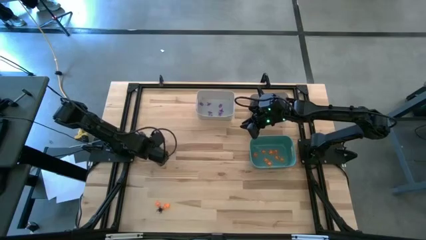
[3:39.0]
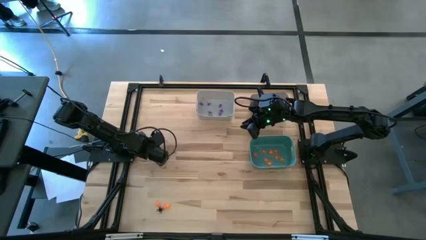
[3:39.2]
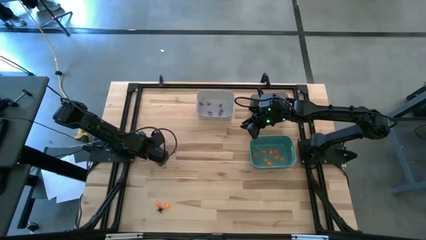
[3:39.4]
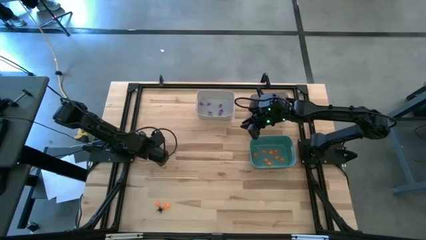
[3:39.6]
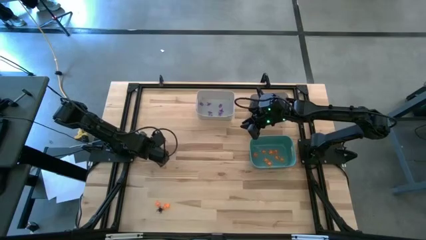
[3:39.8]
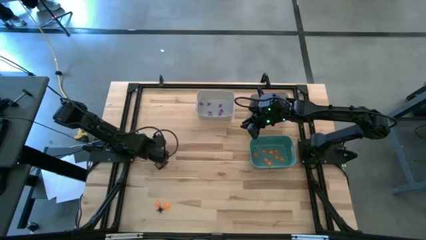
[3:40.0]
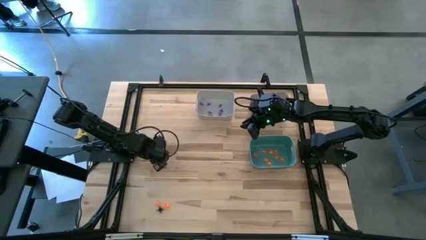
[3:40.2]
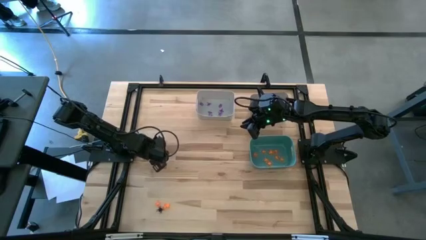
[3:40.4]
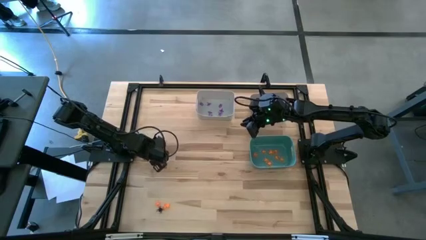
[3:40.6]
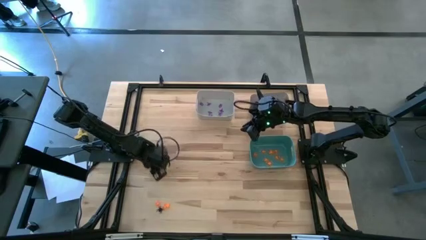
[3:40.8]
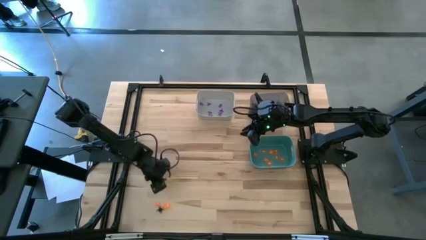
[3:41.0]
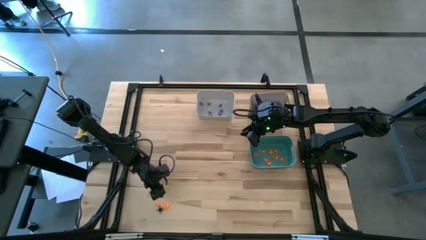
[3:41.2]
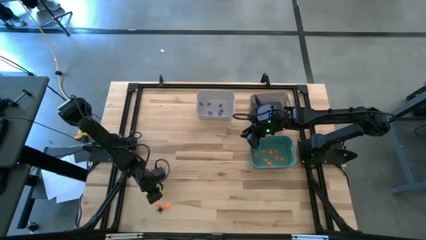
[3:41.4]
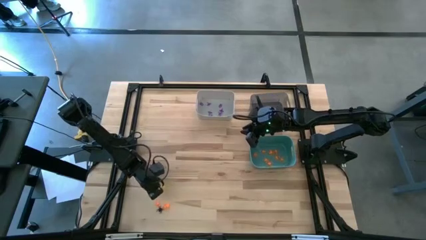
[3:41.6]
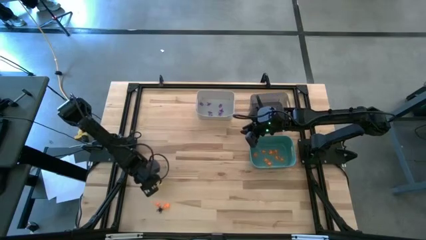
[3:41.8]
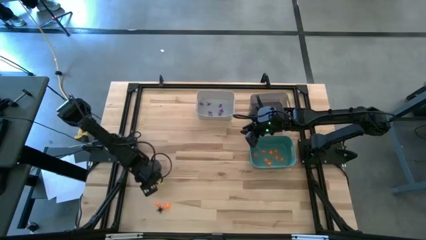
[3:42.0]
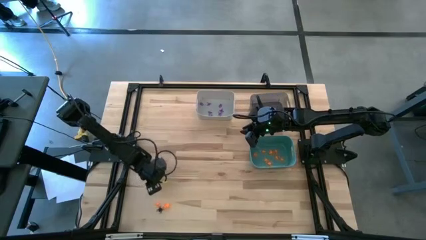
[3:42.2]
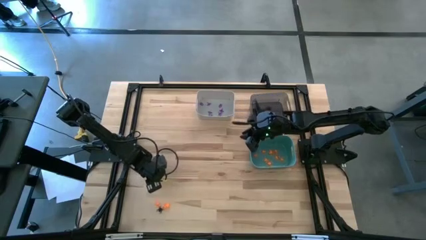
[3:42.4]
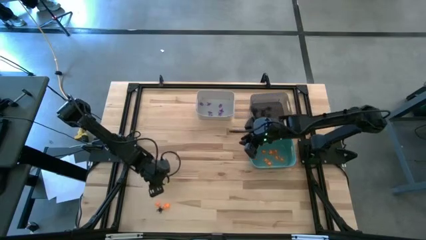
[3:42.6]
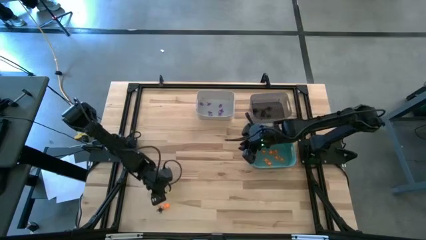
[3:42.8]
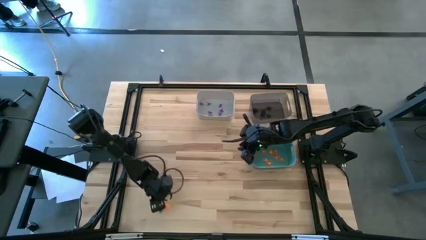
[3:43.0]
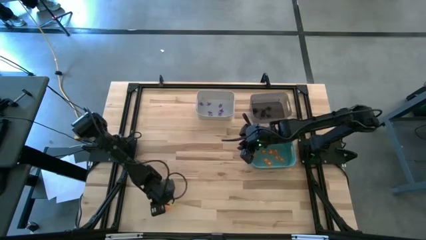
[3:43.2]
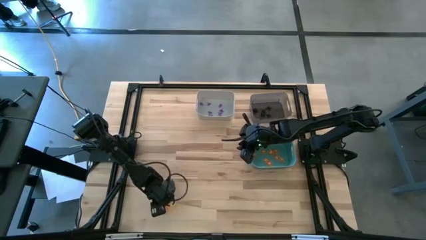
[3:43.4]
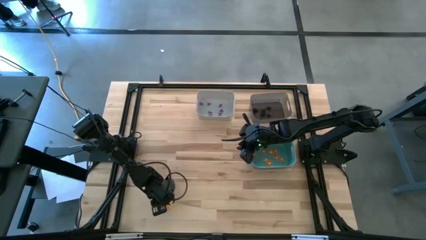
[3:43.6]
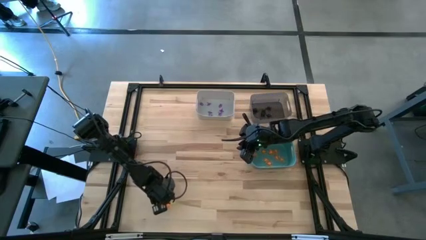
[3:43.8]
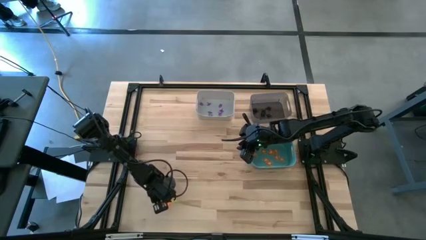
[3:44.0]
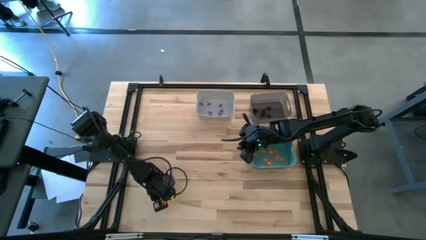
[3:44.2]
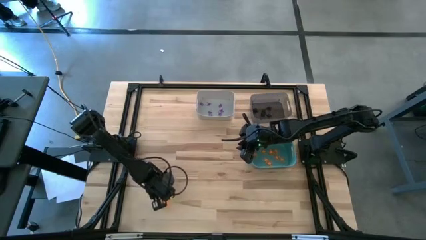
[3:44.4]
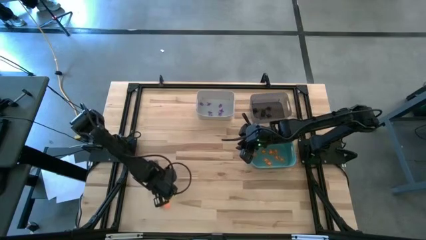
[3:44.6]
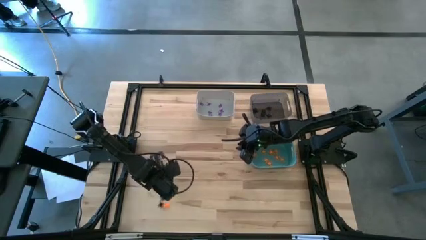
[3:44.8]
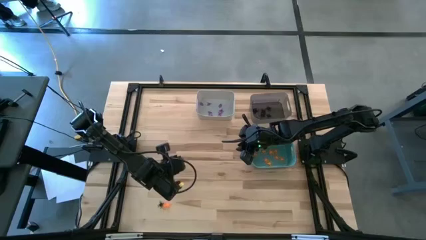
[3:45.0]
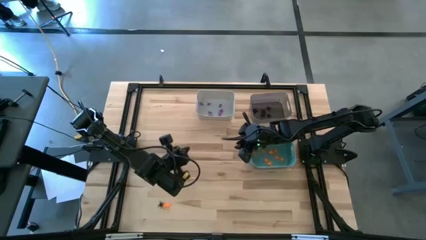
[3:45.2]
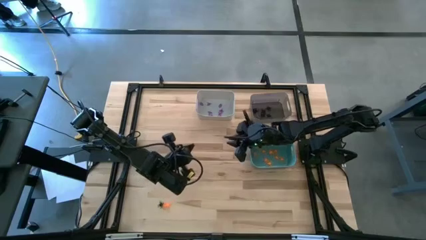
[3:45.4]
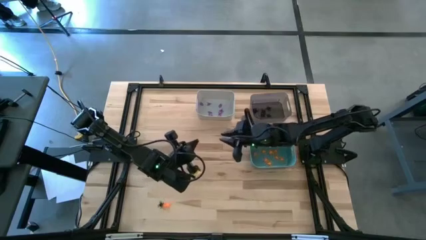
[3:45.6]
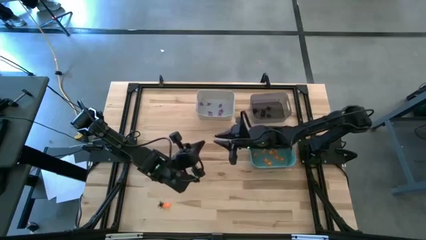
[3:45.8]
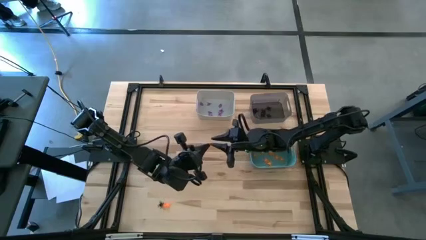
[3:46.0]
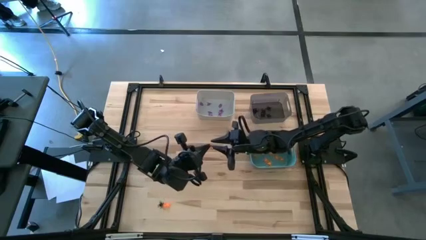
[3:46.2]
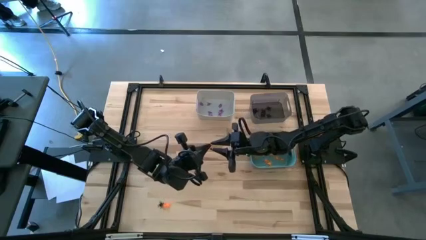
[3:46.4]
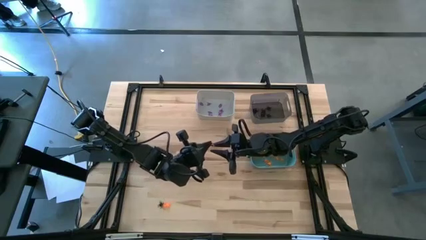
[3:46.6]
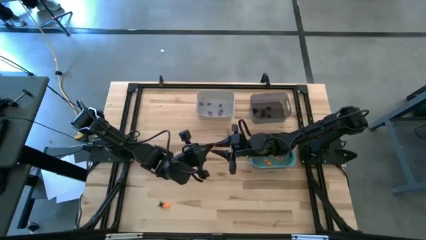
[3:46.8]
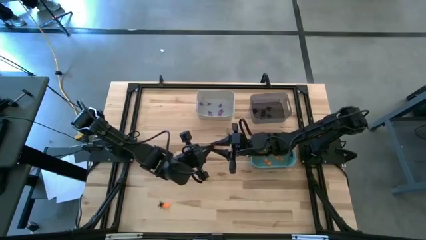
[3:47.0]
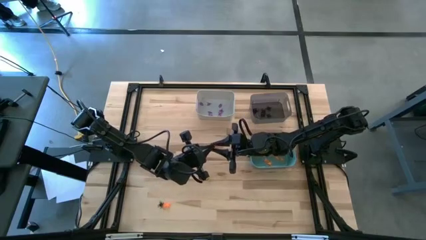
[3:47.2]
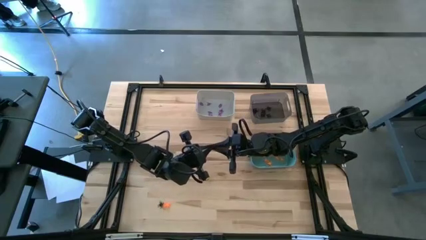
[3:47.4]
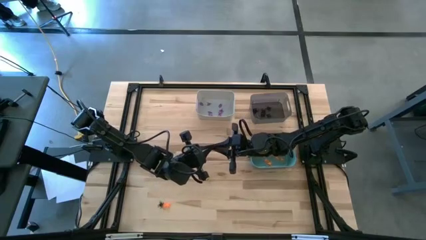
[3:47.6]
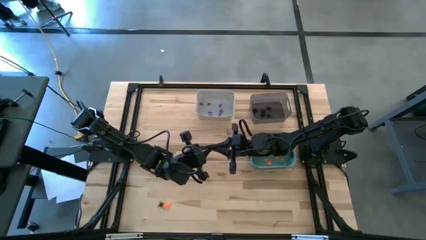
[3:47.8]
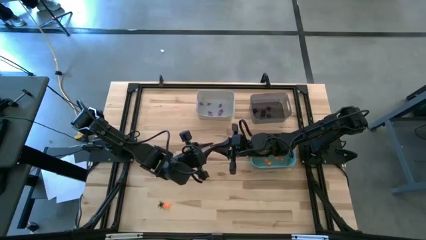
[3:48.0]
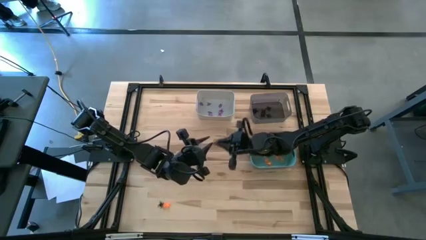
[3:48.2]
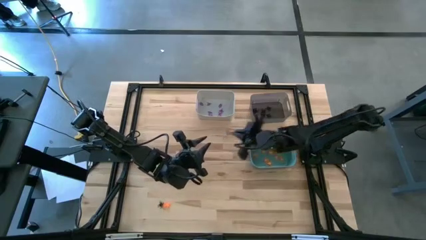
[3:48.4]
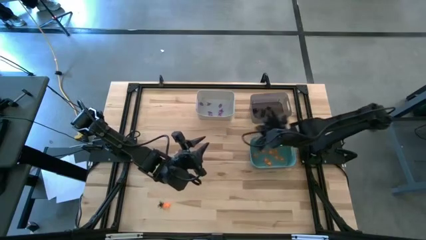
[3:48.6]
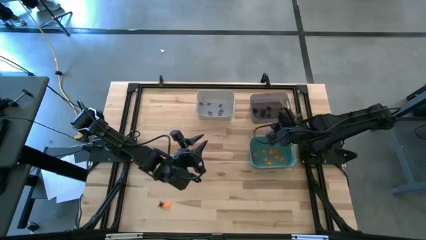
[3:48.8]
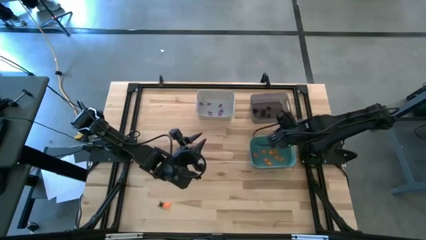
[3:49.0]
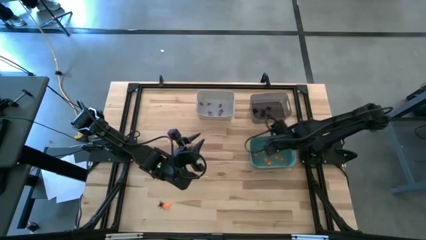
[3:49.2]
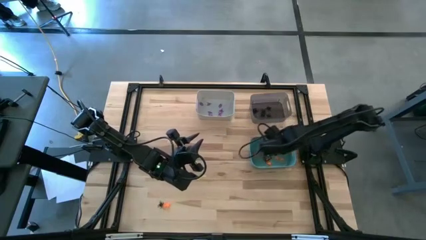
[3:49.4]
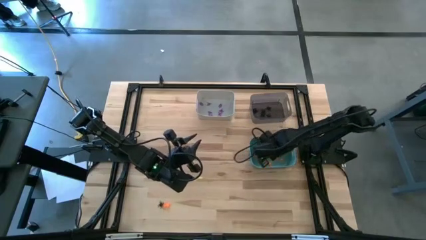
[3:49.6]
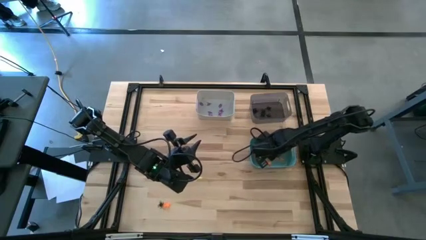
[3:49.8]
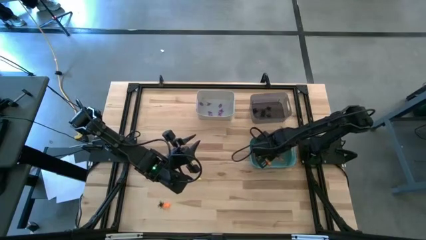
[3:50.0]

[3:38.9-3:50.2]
Task: Sort Halloween decoration
Put the orange spider toy into the green bin

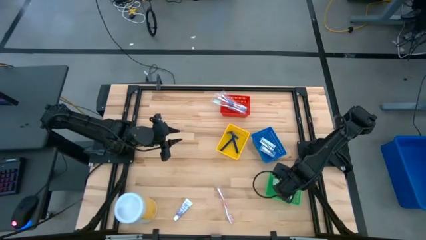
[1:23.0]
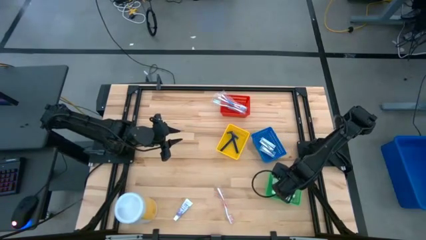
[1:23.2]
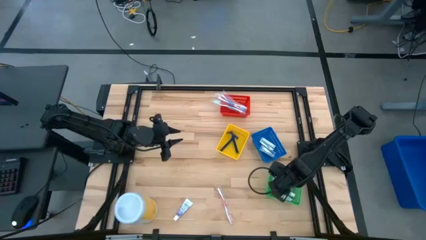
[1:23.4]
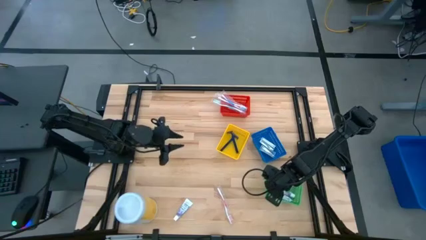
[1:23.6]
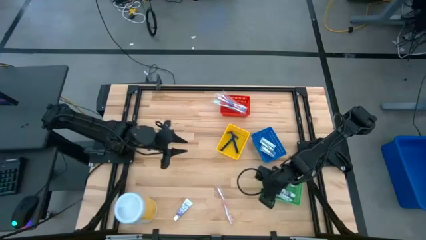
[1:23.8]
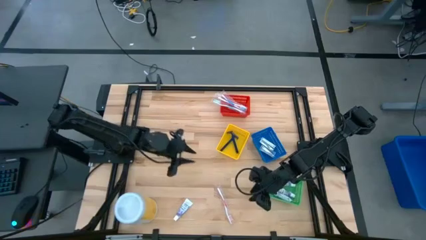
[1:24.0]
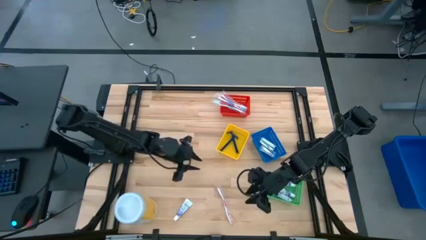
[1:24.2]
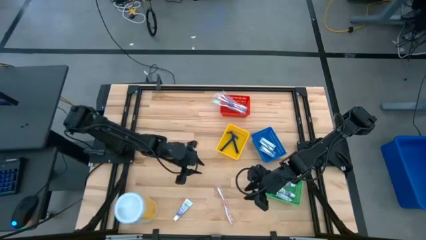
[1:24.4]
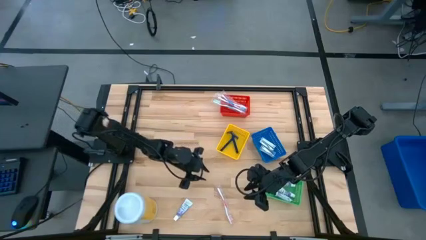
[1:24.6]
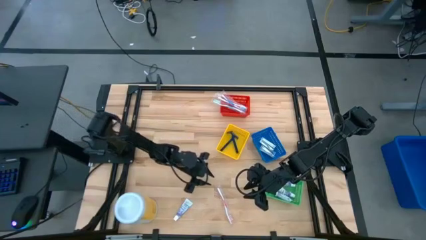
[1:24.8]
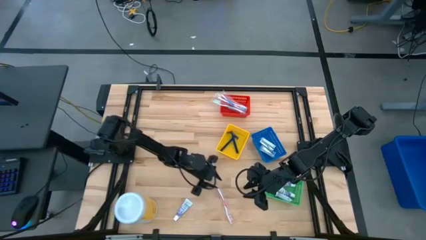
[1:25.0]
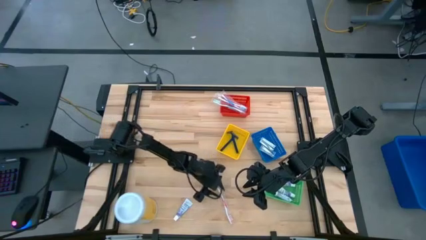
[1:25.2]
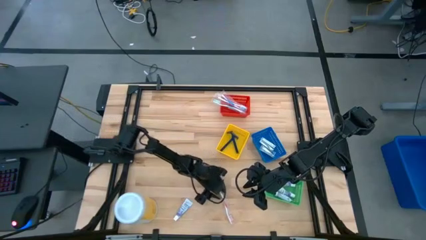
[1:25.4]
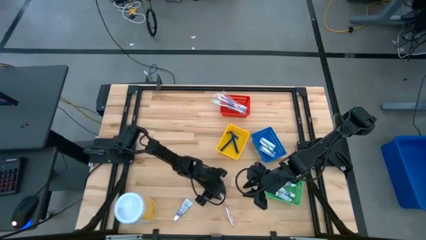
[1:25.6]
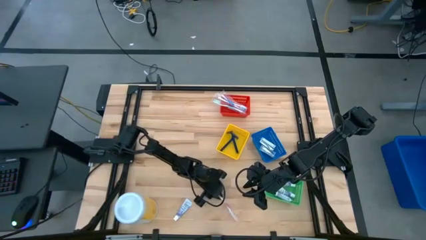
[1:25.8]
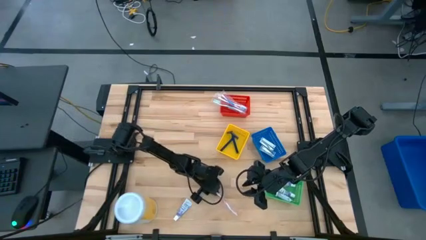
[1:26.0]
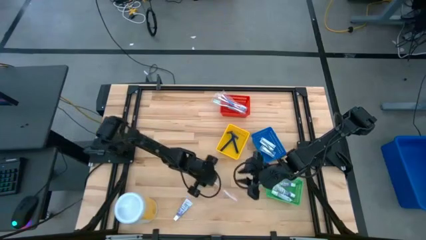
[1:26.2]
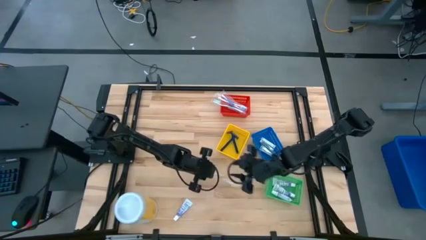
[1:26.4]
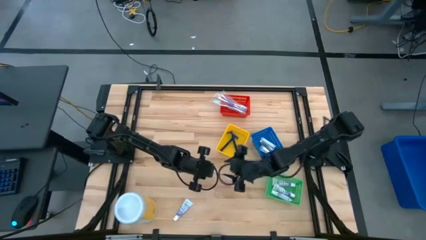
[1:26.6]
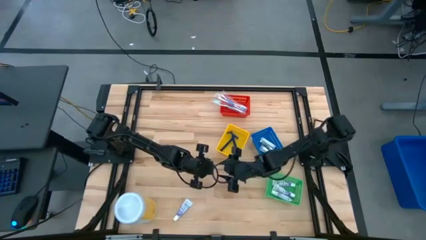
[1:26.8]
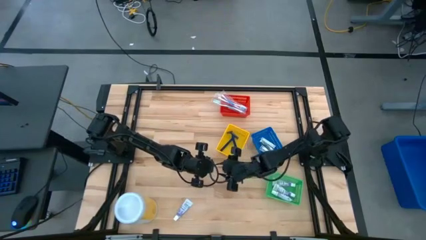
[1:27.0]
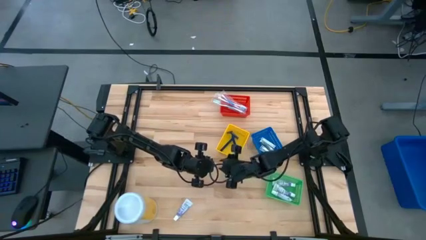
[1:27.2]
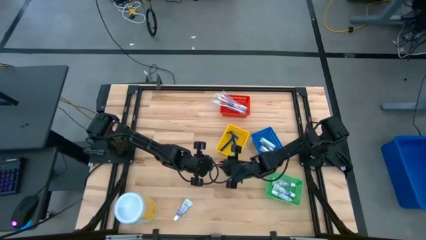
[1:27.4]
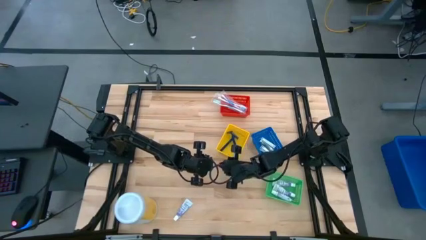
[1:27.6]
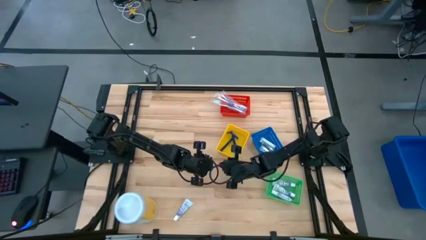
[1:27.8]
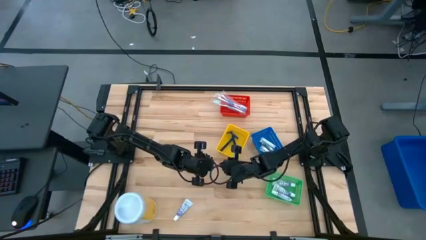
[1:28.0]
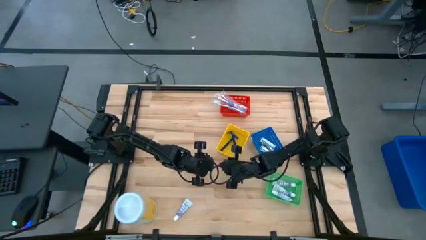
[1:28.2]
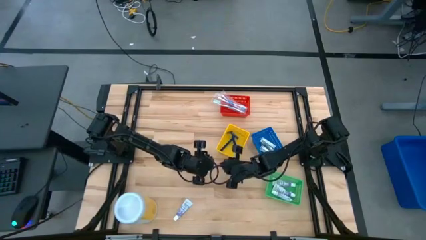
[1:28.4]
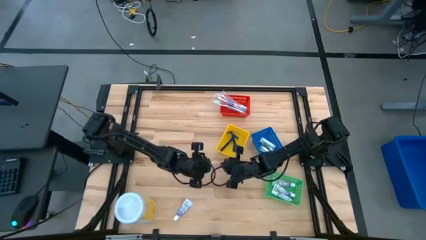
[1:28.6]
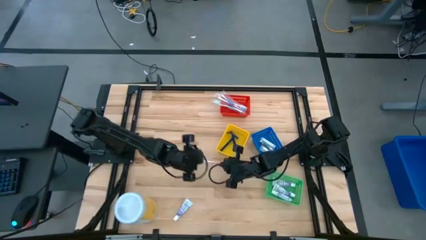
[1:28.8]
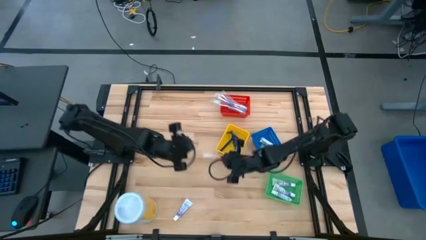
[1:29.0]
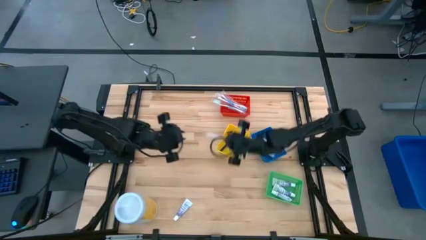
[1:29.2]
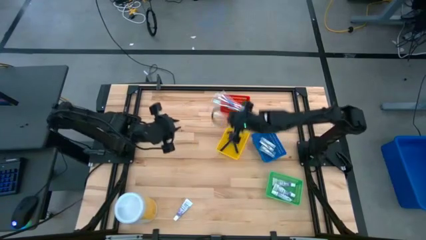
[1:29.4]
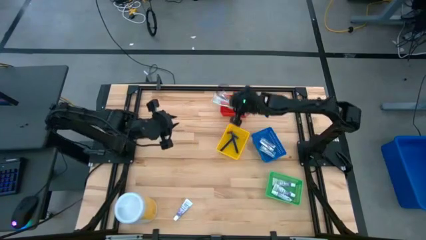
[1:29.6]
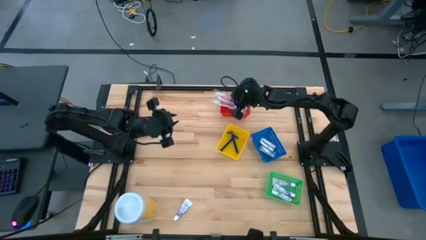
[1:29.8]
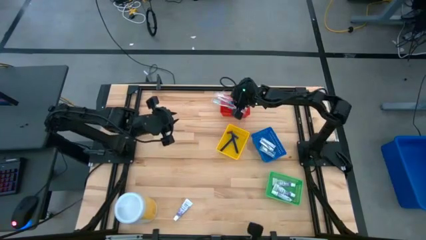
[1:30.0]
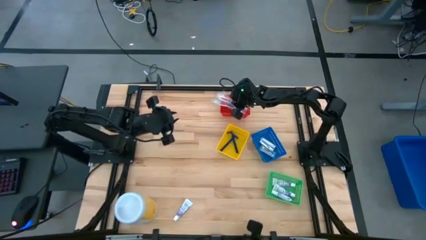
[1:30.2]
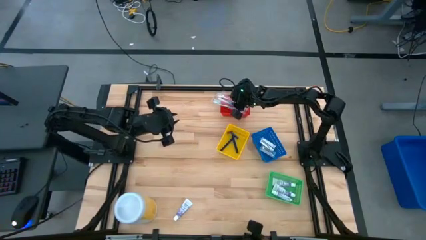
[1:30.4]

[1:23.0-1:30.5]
Task: Pick & Place Travel size toiletries
Put the orange toothbrush into the red bin
